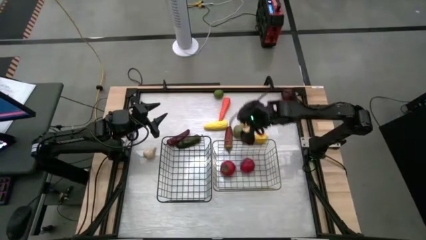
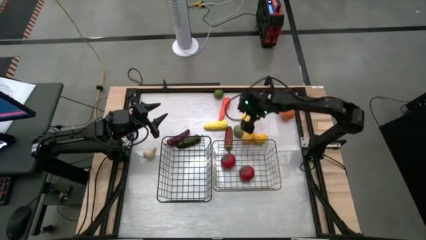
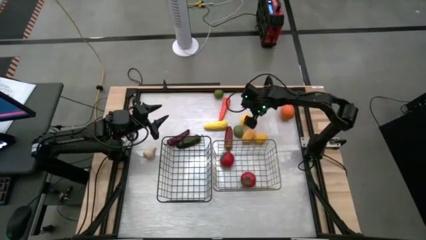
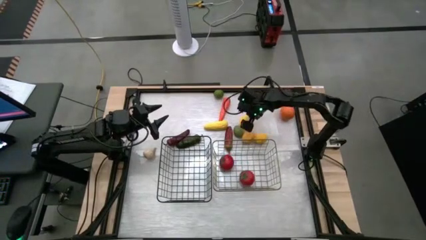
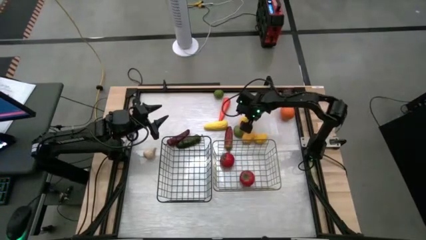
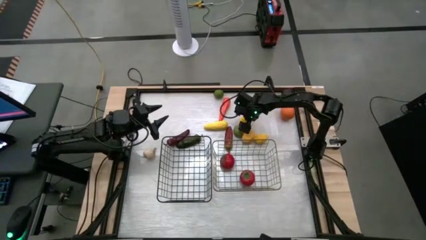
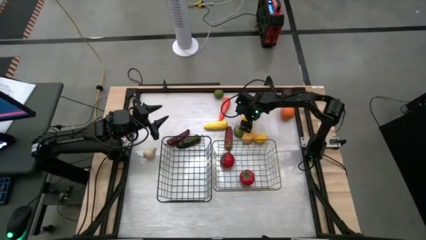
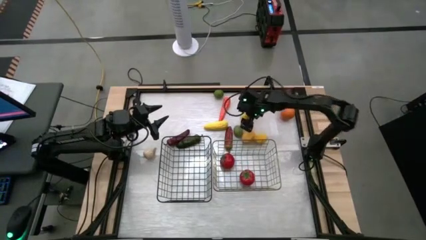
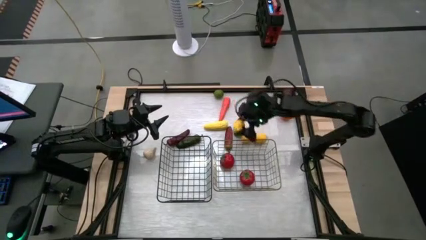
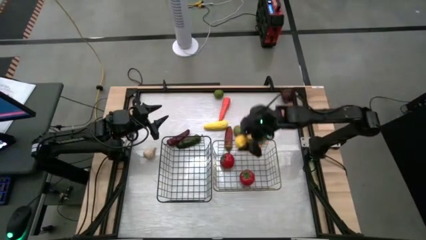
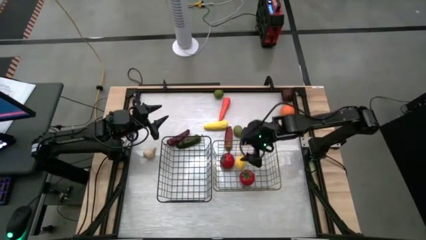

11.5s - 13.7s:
Task: Sort produce into baskets
Put the top left lemon into the right wire basket

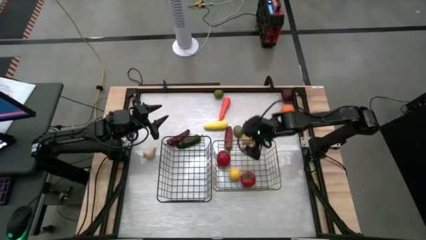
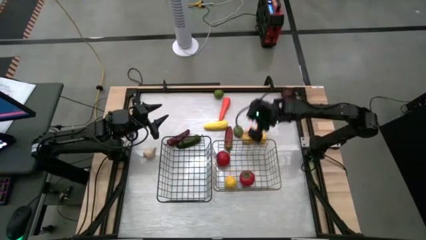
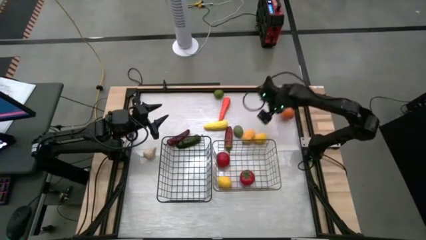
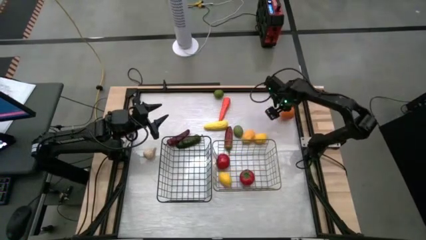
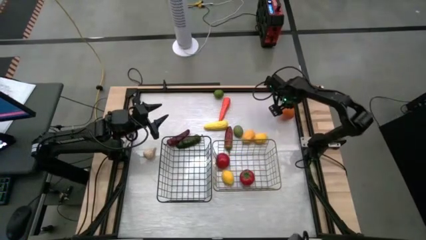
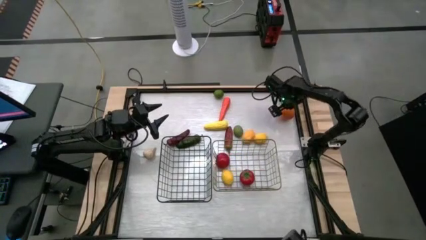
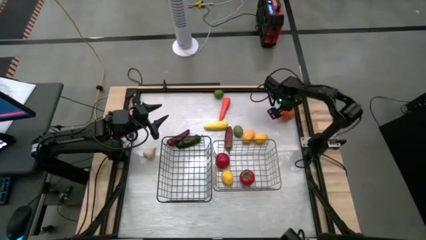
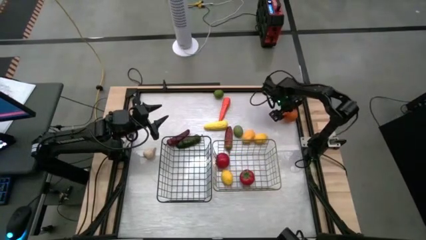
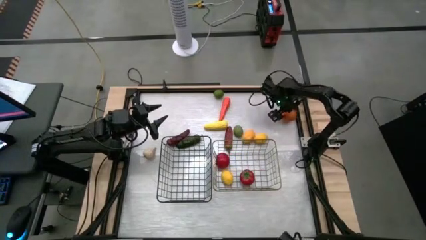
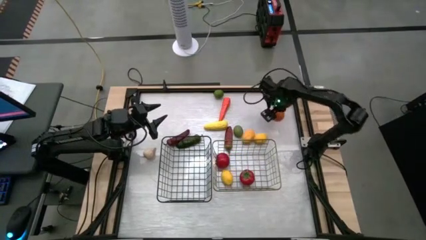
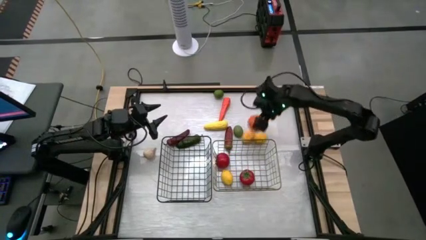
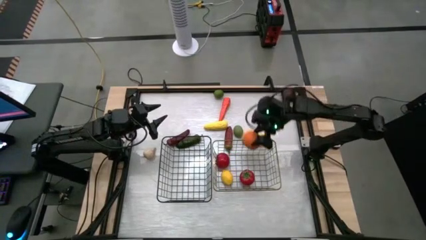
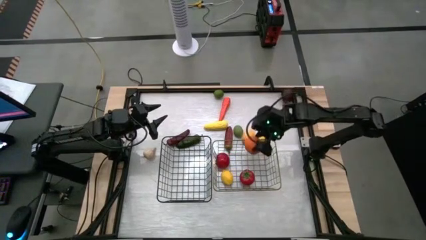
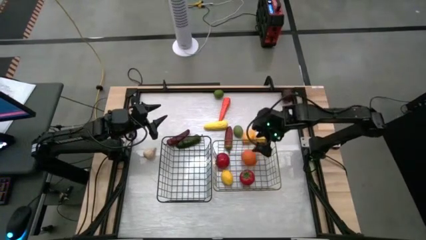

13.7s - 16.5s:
Put the orange into the right wire basket

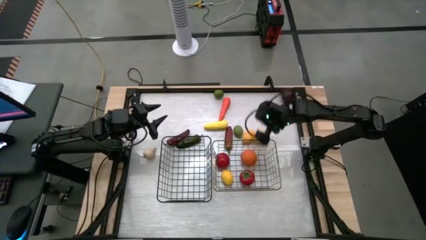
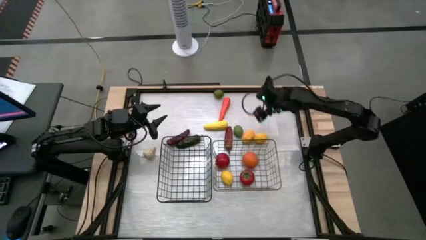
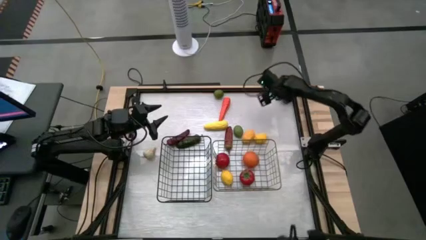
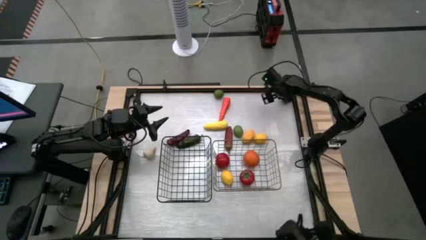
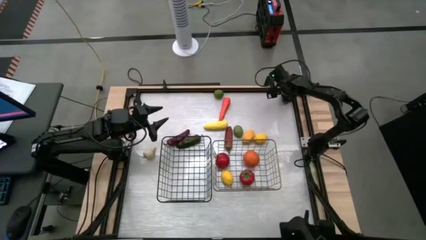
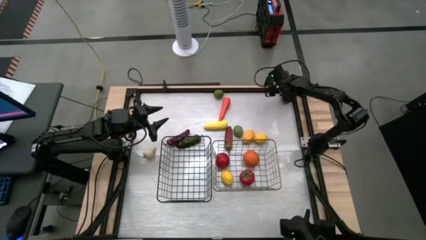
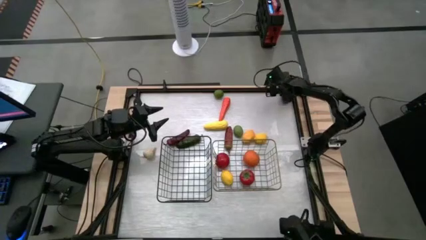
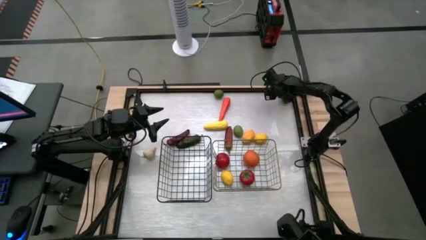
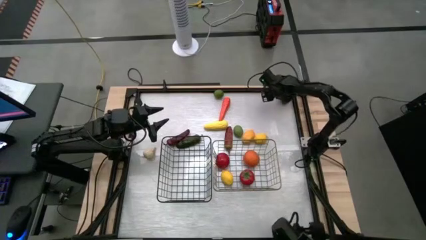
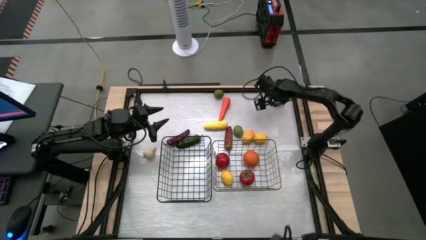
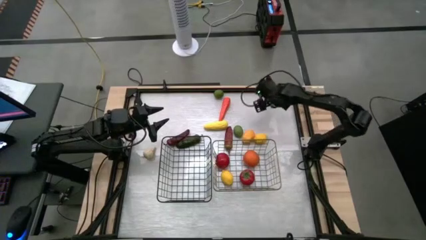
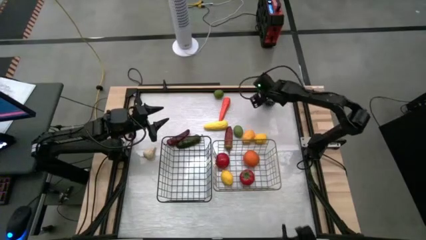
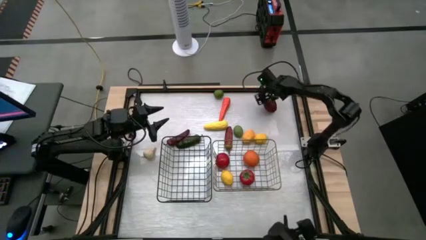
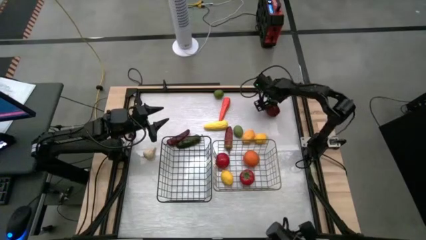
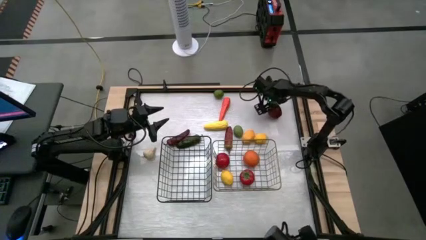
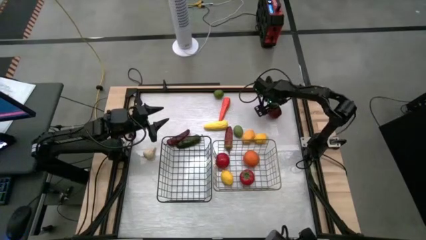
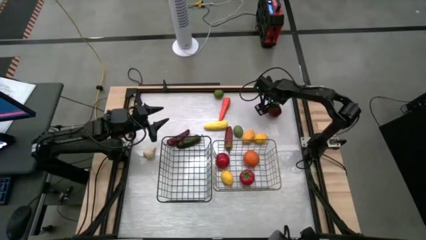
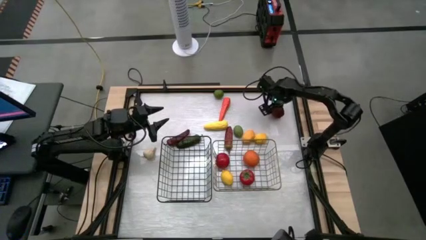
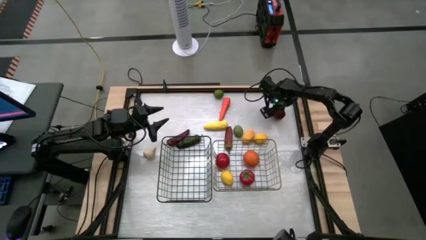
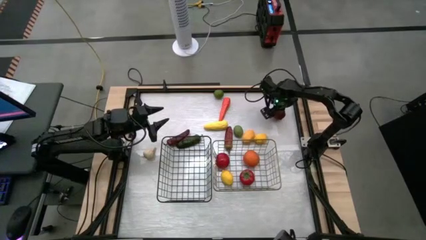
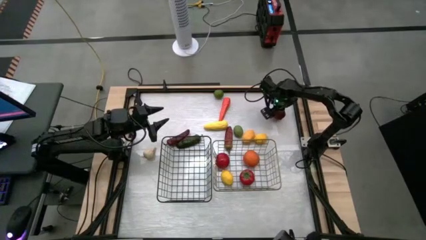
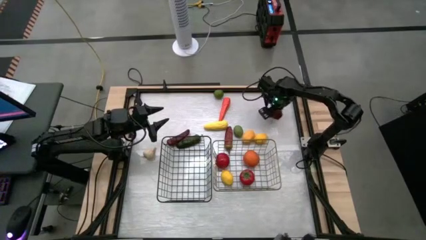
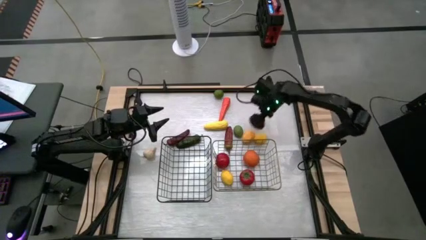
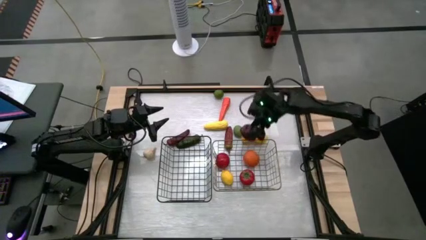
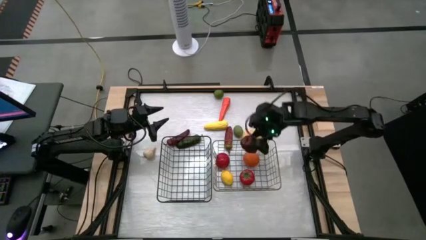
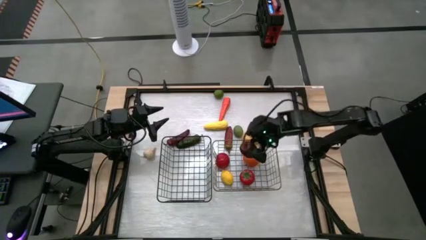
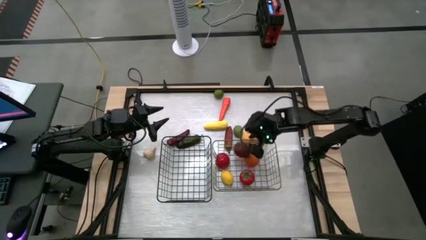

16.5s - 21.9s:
Put the apple into the right wire basket

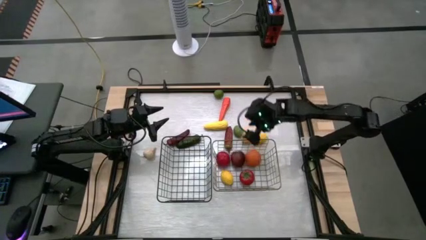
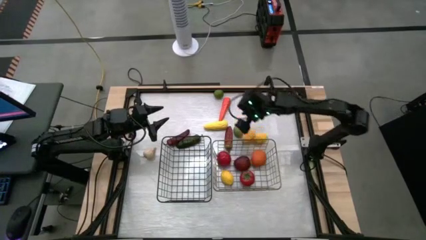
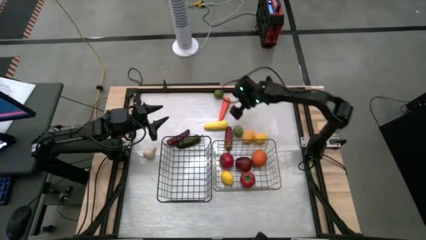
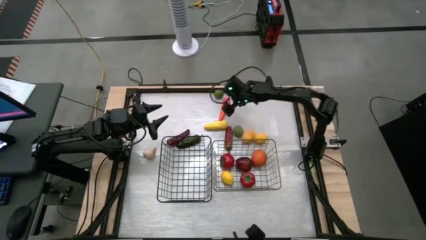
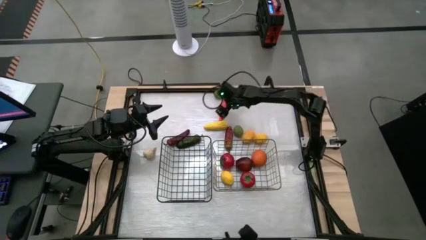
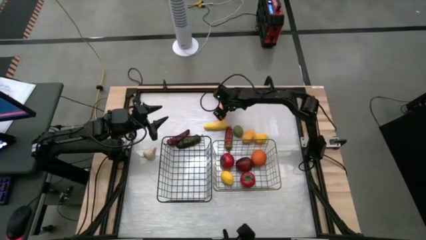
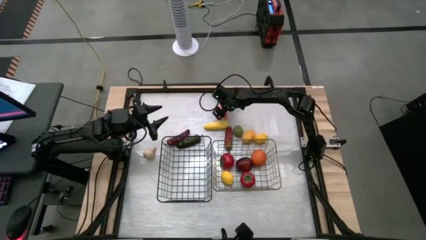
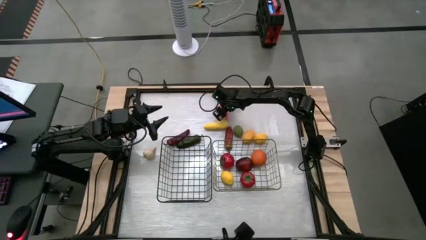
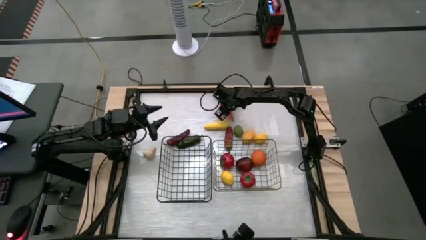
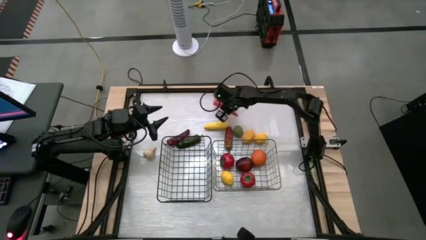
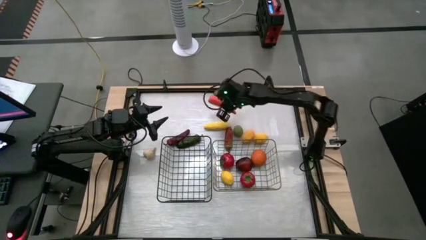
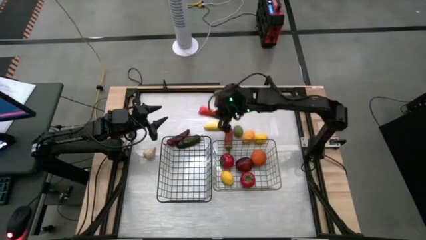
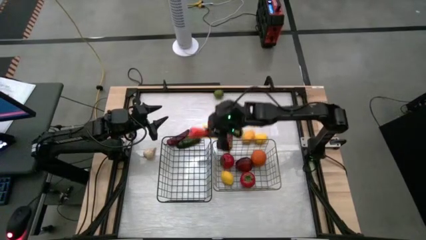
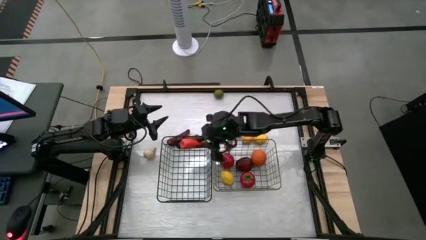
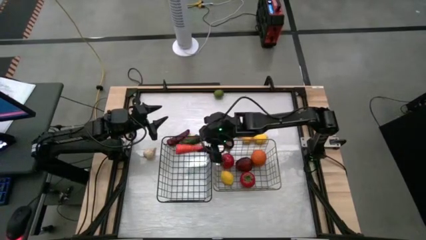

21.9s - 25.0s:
Put the carrot into the left wire basket

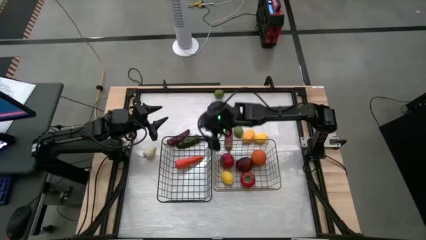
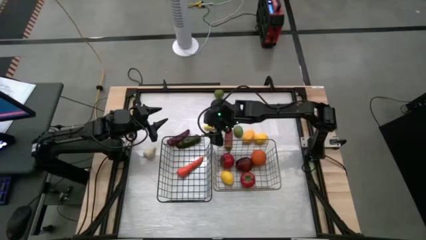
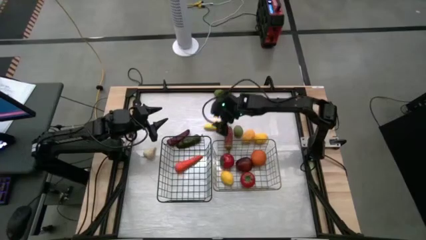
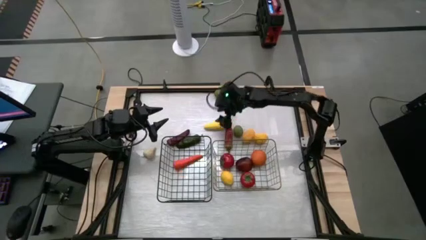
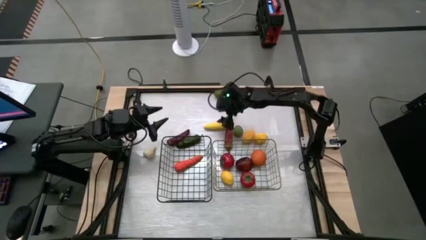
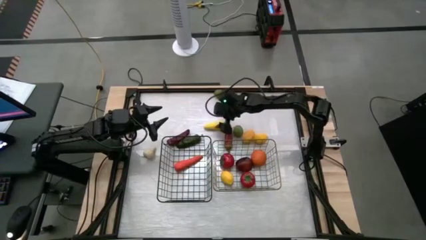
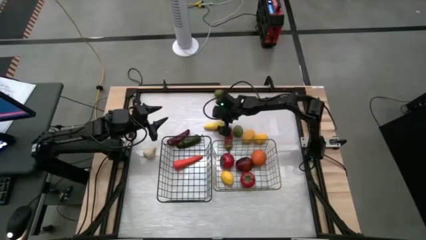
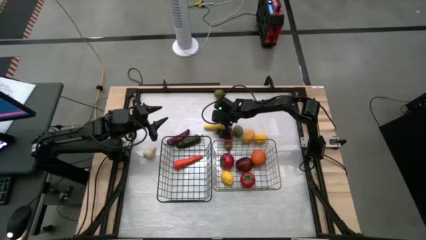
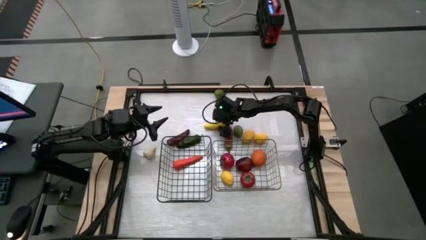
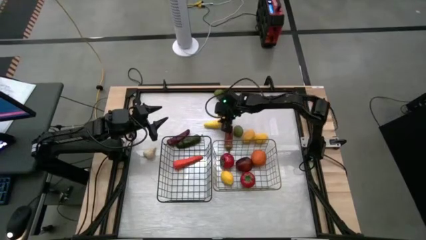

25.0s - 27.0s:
Put the corn into the left wire basket

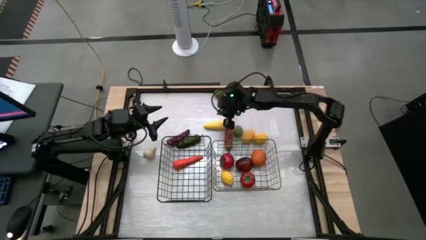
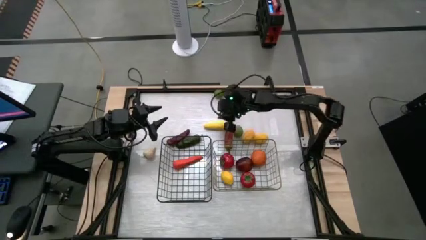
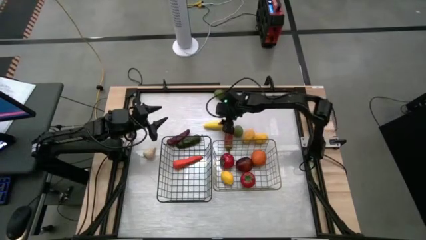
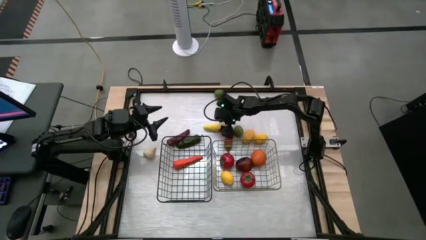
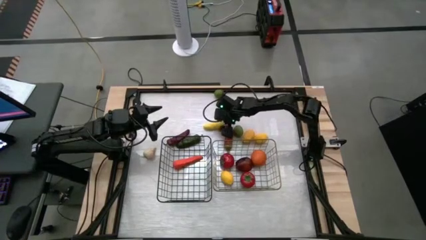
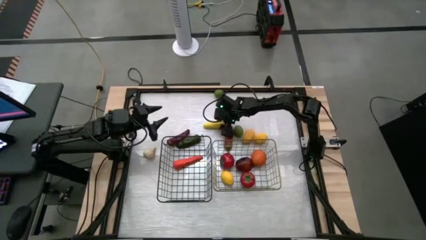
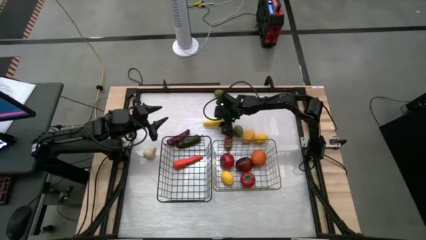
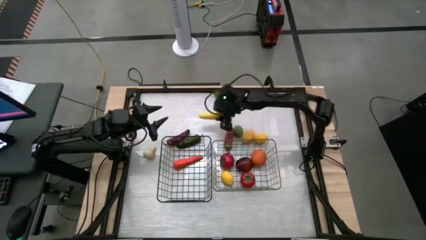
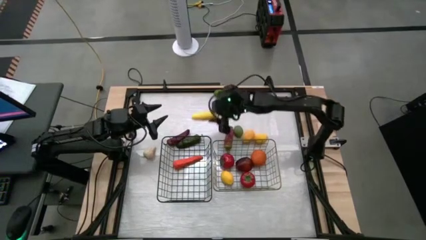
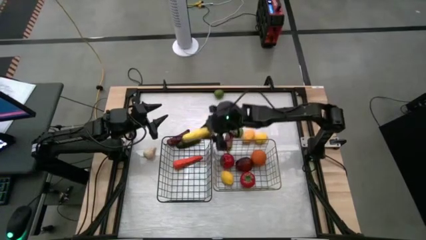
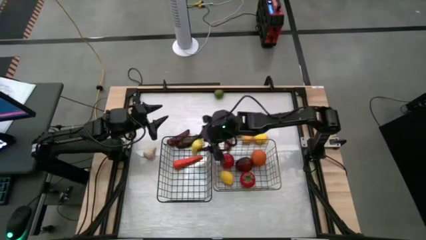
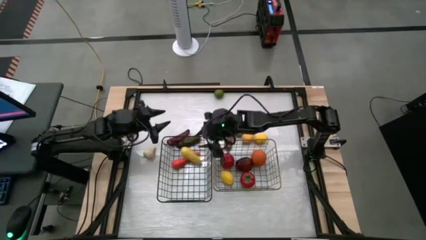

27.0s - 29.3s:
Put the corn into the left wire basket
